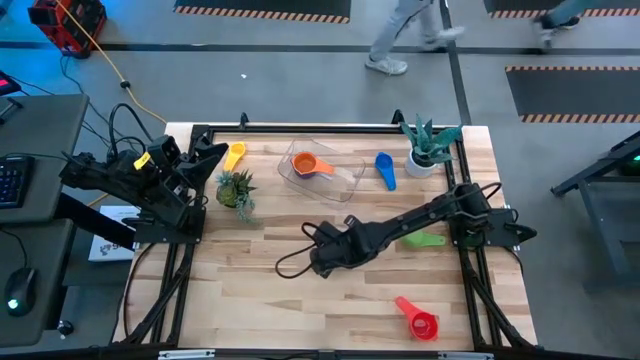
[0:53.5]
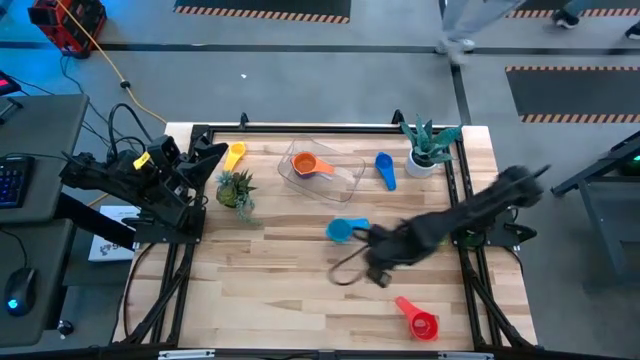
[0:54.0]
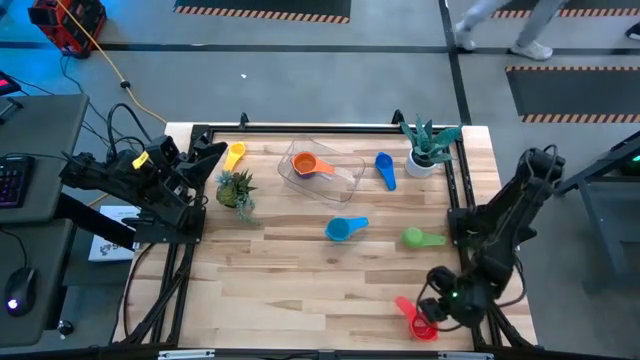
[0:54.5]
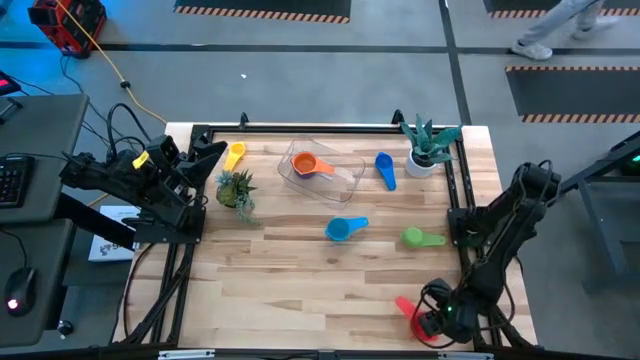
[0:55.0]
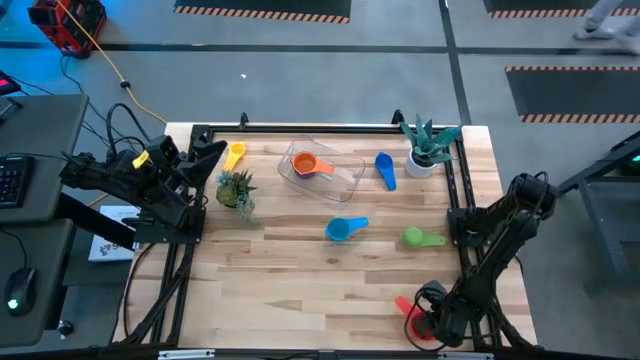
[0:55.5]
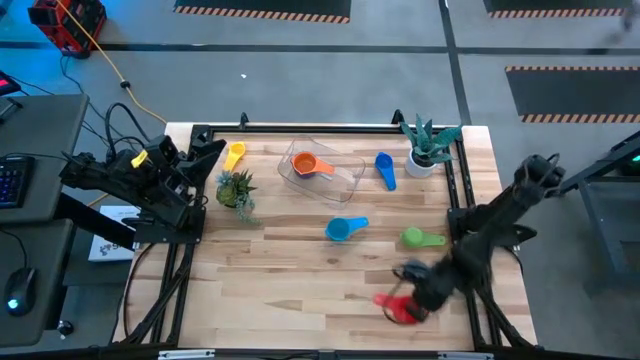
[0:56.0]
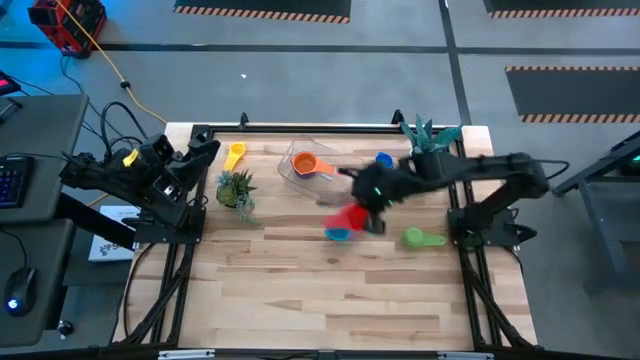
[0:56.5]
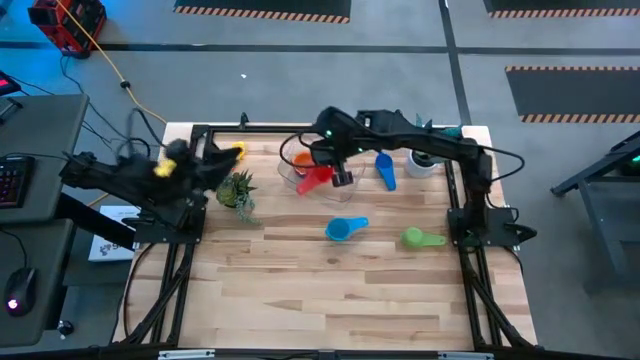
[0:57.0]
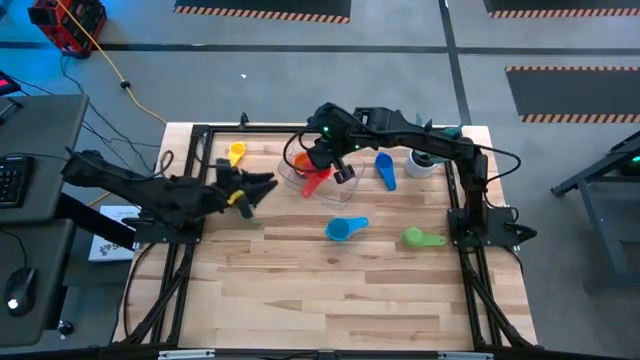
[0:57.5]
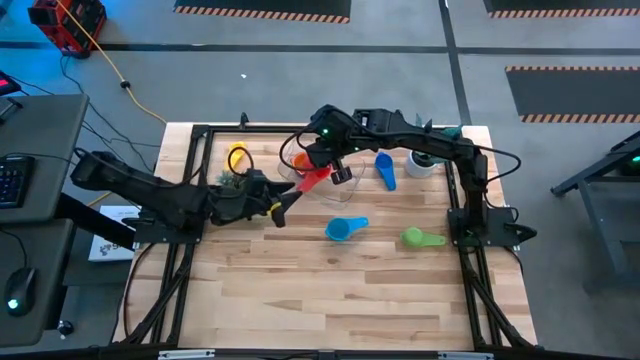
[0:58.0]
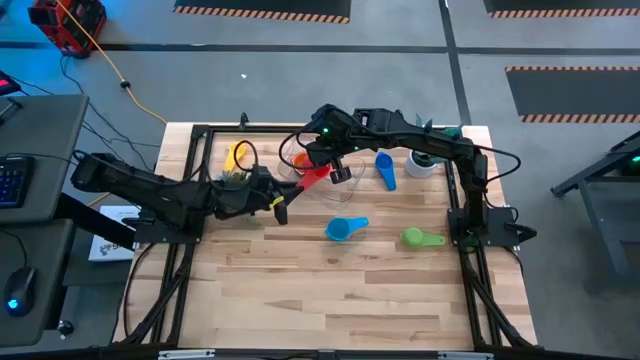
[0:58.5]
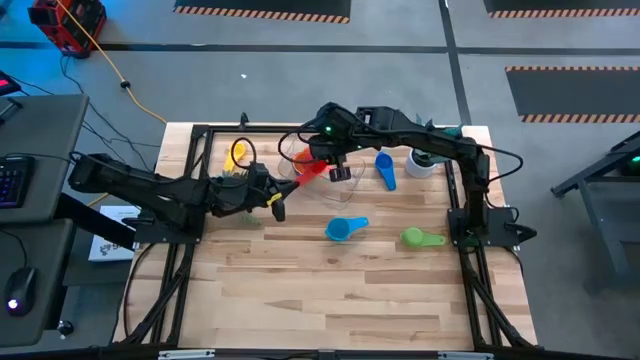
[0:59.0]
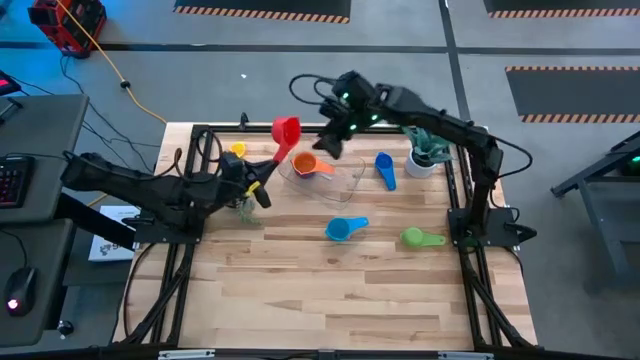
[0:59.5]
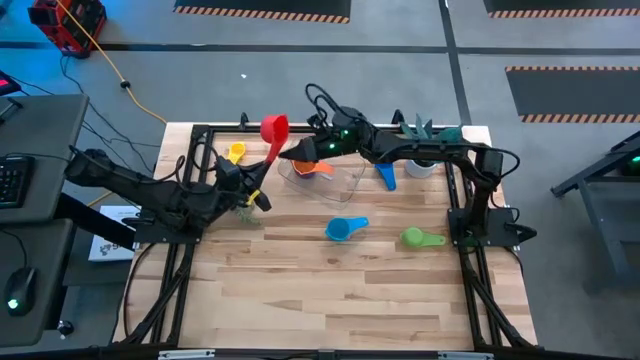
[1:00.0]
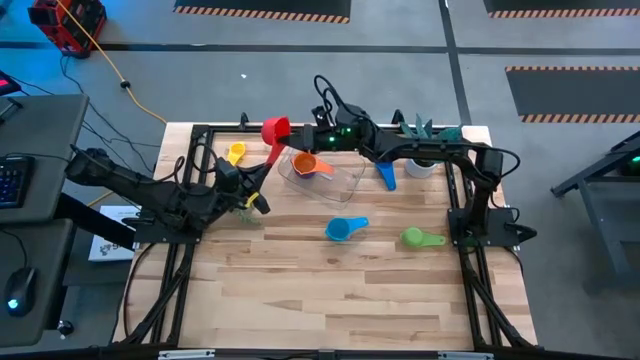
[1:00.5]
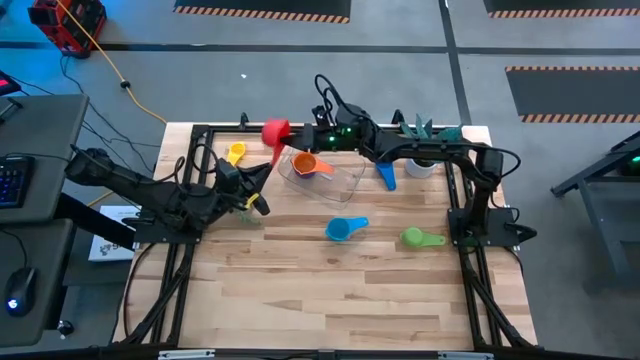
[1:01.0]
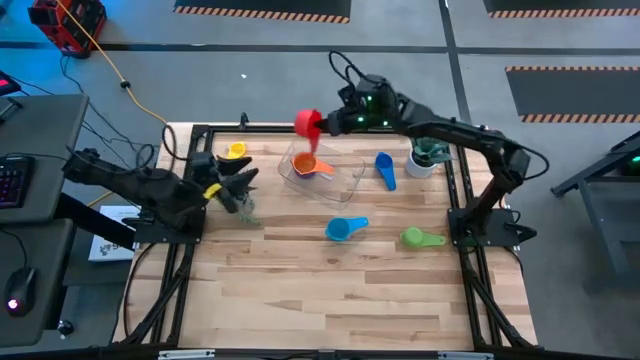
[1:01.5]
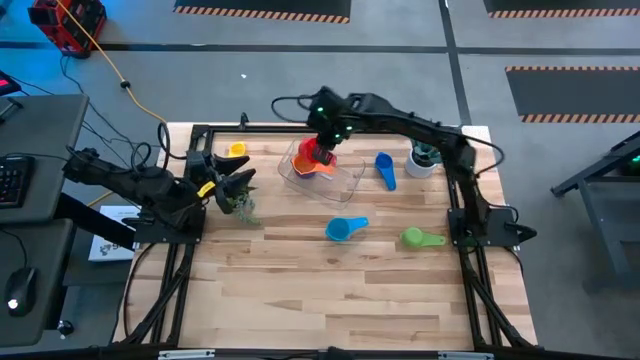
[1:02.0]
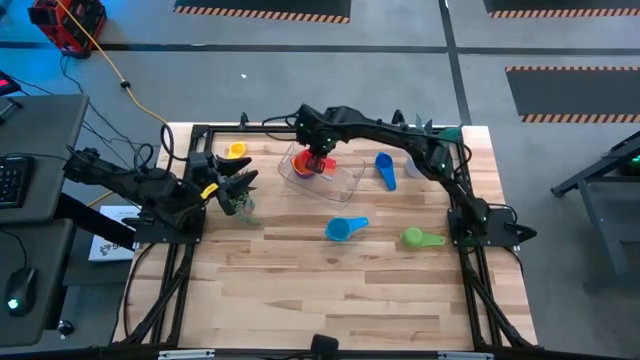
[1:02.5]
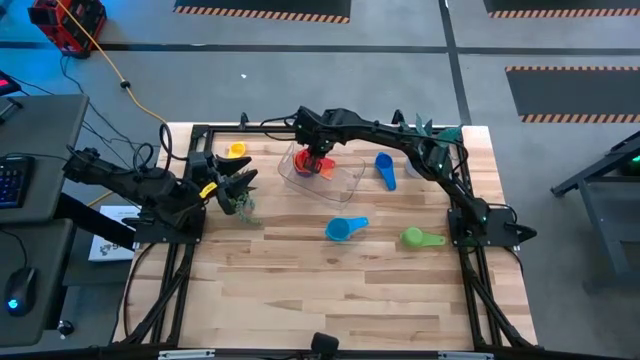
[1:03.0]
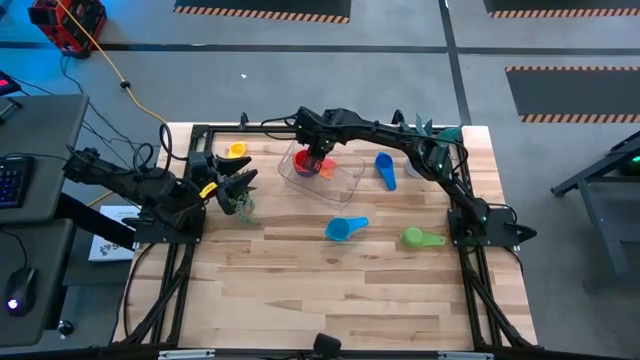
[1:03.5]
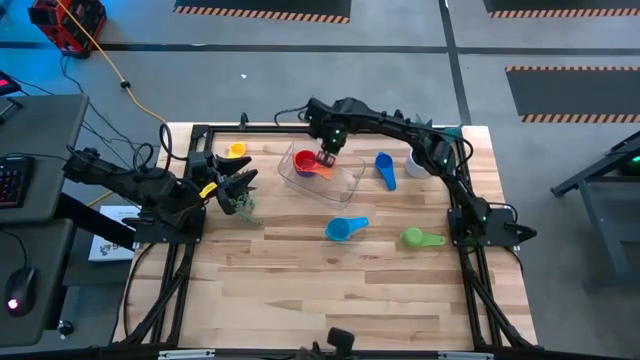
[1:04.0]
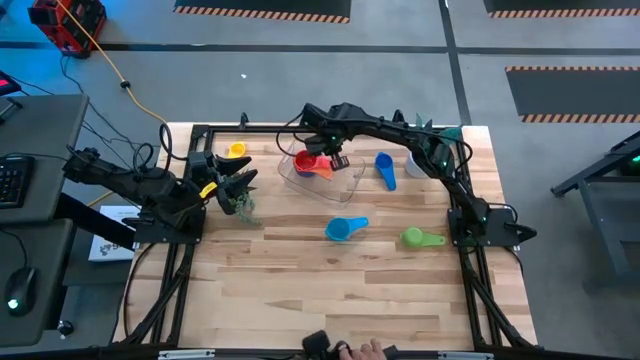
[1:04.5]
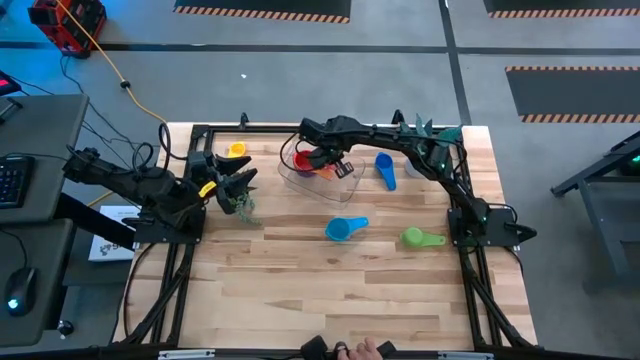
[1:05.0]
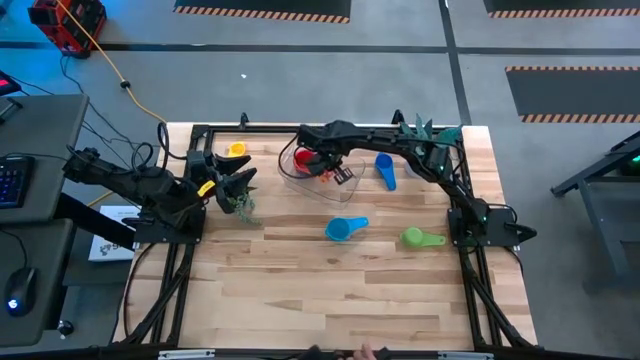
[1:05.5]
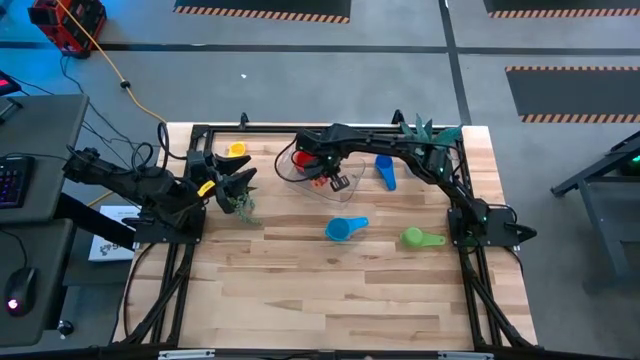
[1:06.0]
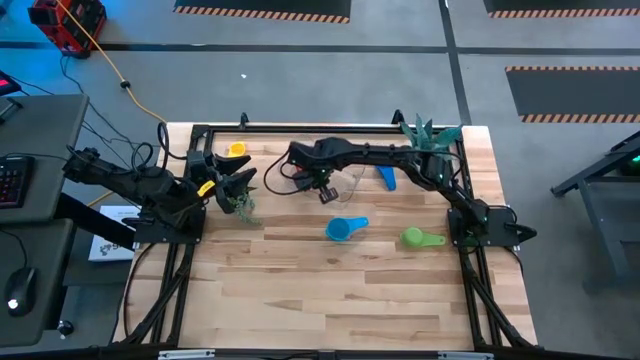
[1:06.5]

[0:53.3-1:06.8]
Task: Nest measuring cups in basket
Stack the red measuring cup on top of the orange measuring cup on the transparent bin

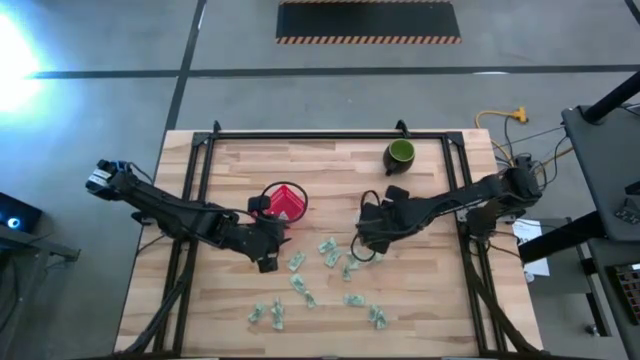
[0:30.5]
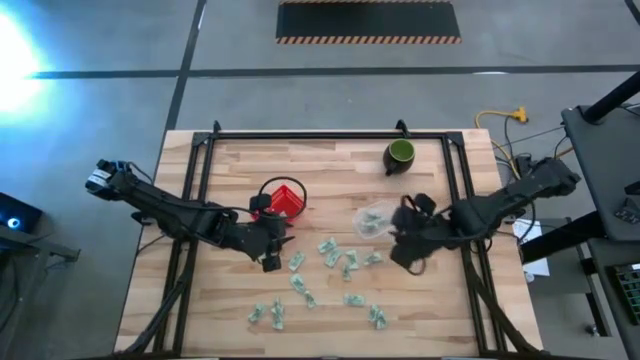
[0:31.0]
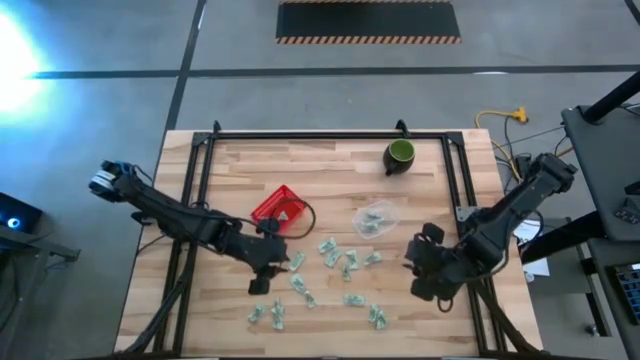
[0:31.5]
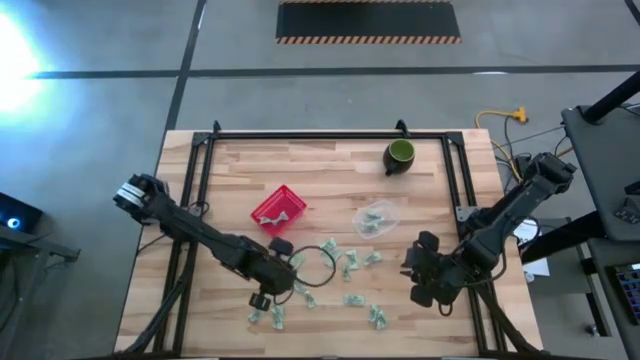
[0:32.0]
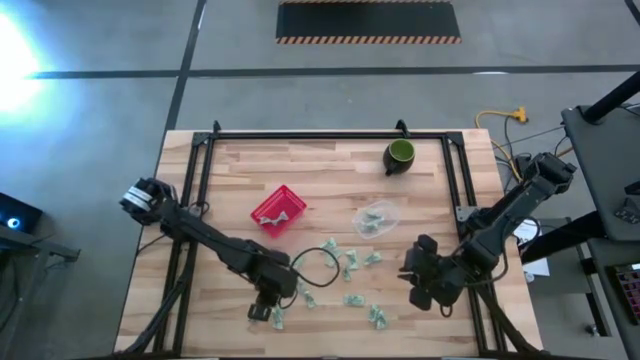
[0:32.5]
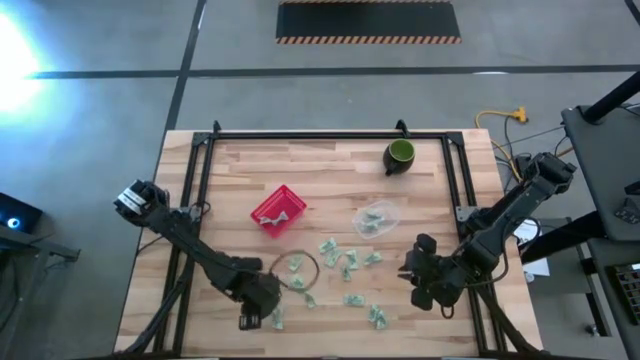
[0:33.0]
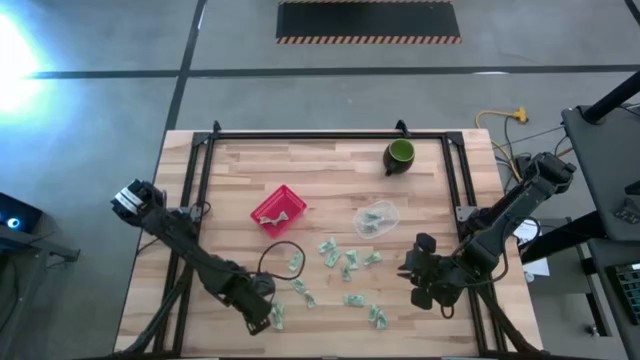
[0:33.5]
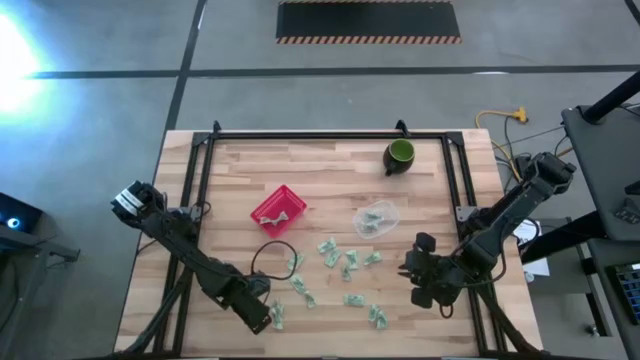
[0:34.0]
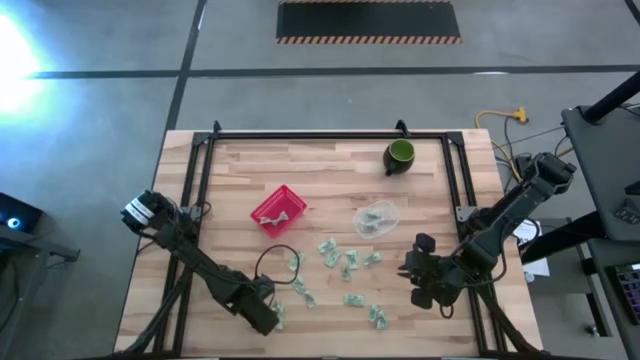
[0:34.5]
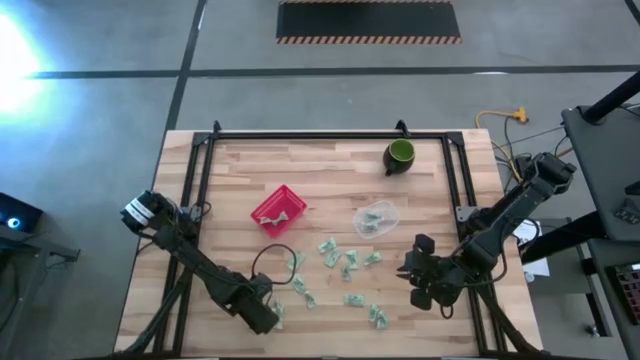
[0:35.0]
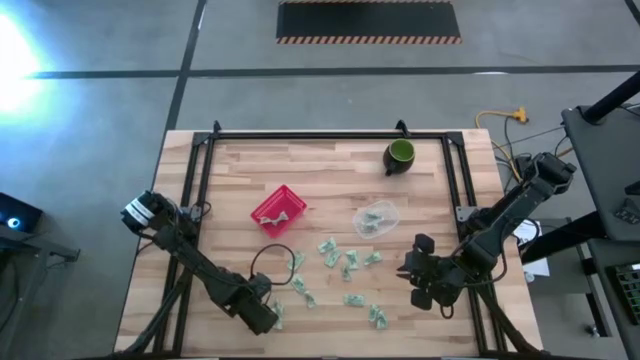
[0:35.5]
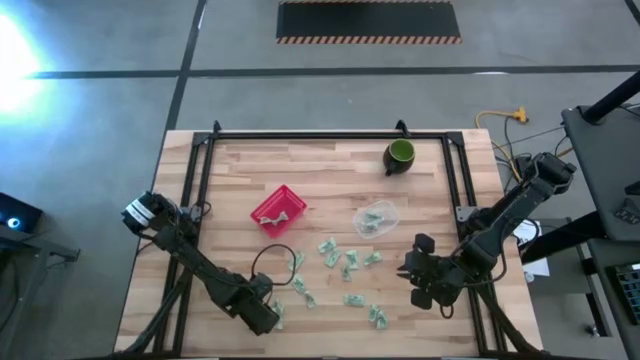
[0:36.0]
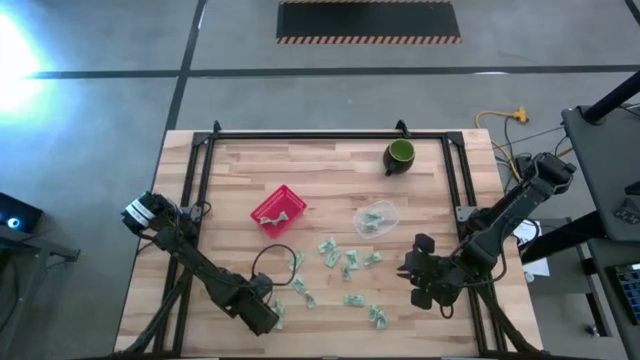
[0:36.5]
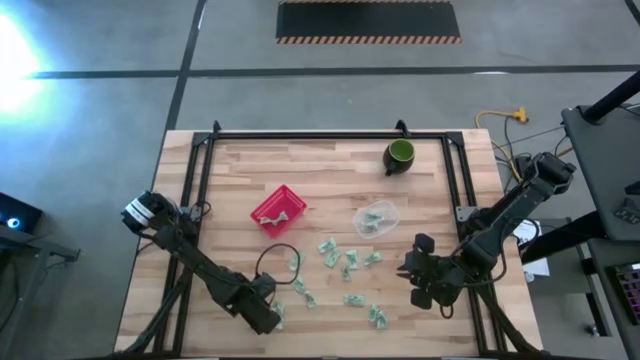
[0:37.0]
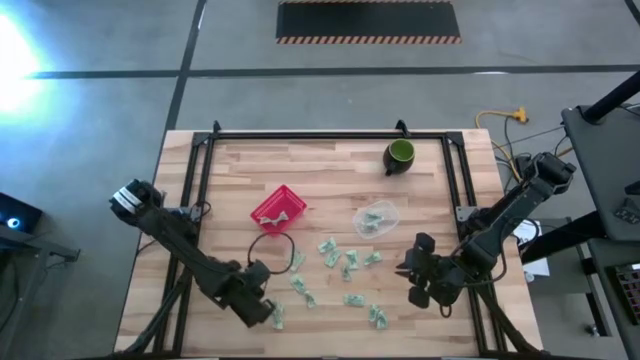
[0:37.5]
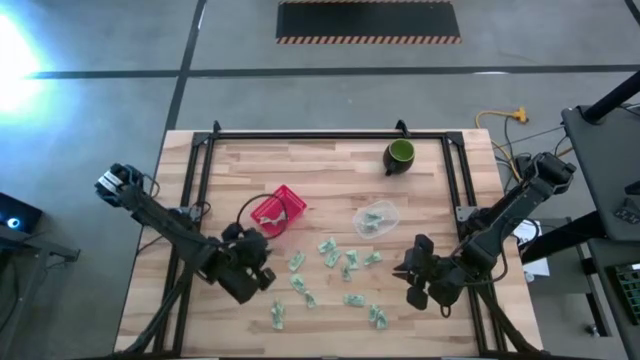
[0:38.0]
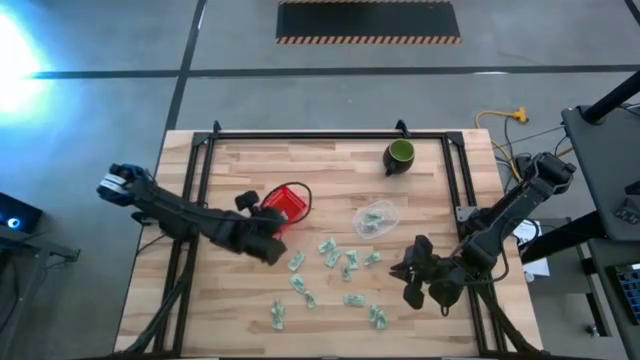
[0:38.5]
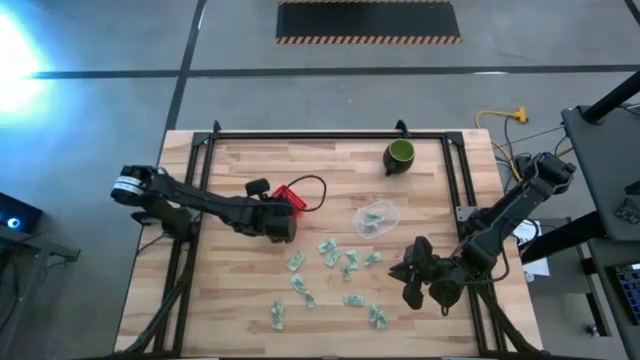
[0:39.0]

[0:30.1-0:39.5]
Task: Pick and place items into bin
Put the stevia packet into the red bin
